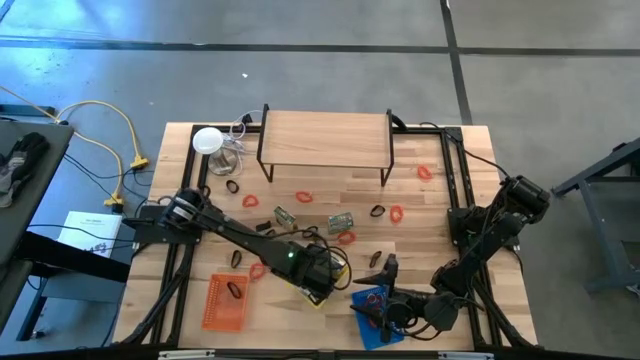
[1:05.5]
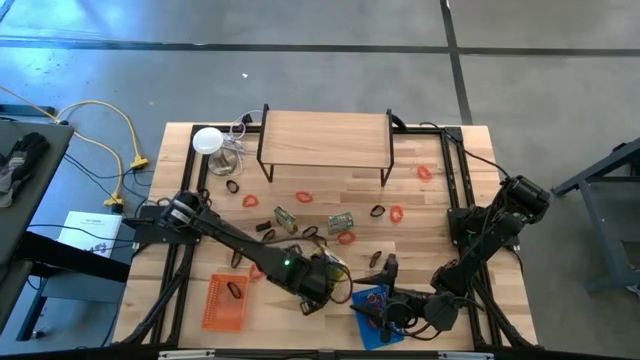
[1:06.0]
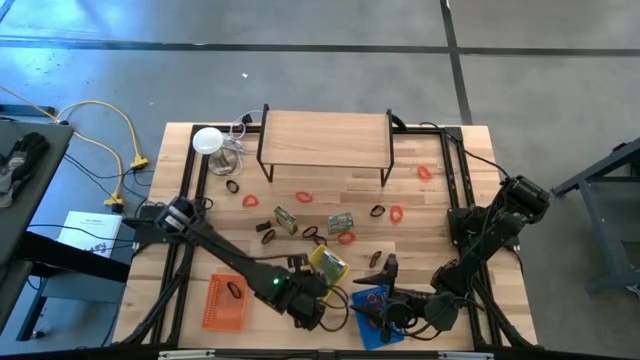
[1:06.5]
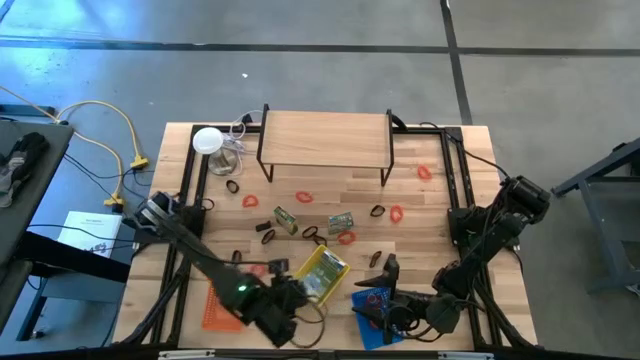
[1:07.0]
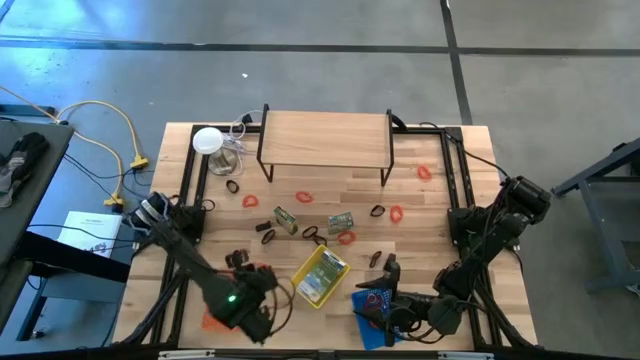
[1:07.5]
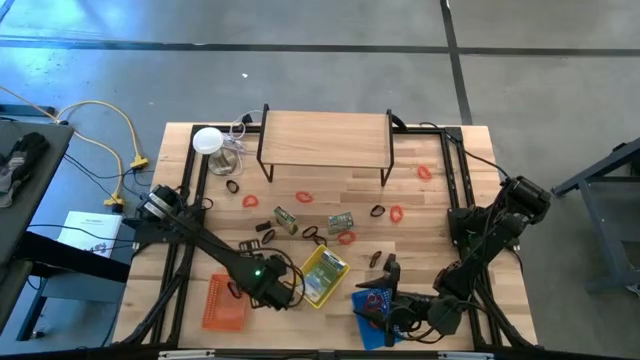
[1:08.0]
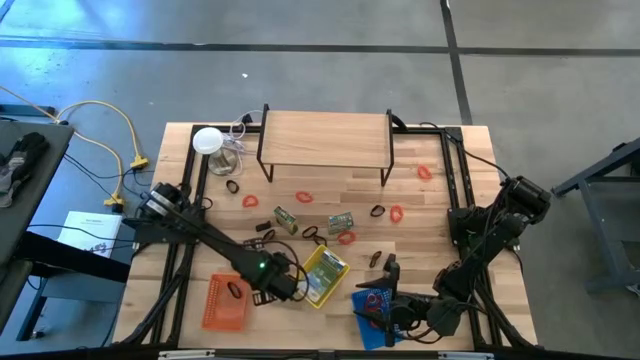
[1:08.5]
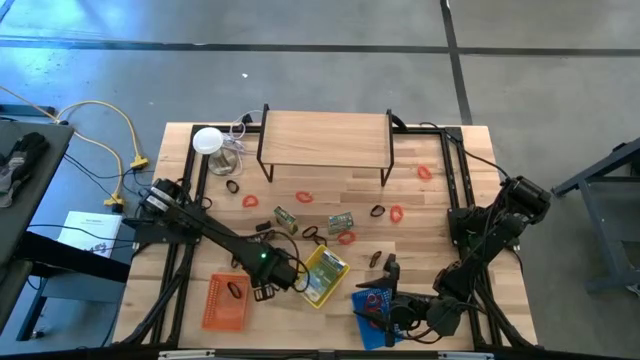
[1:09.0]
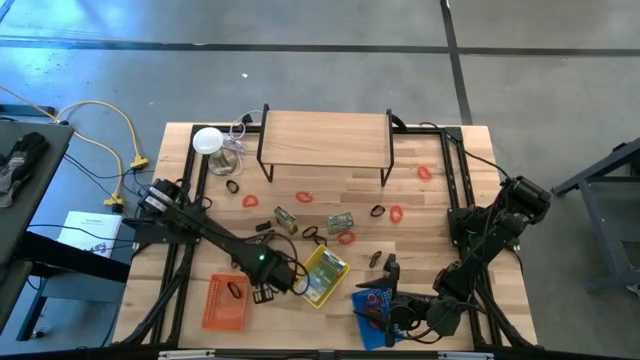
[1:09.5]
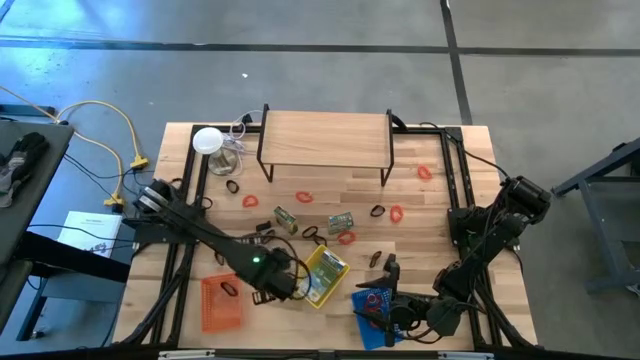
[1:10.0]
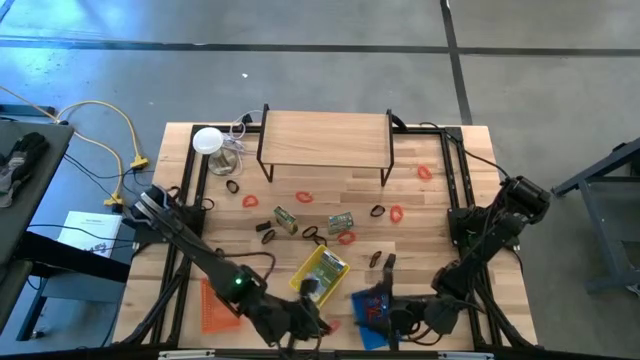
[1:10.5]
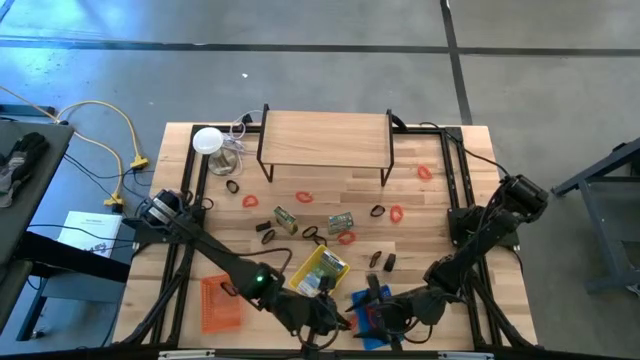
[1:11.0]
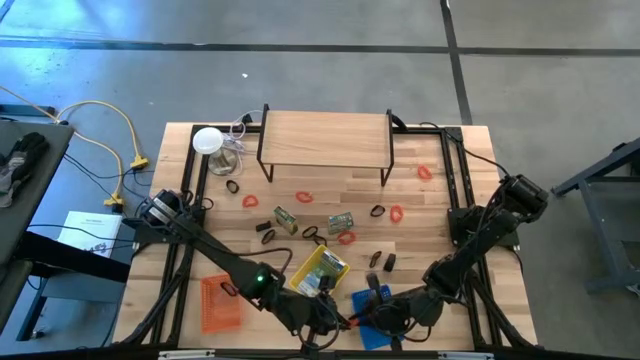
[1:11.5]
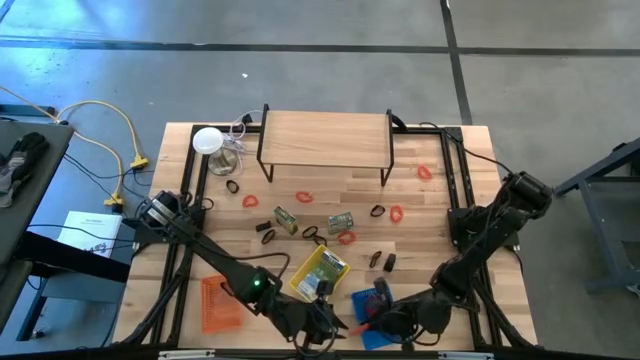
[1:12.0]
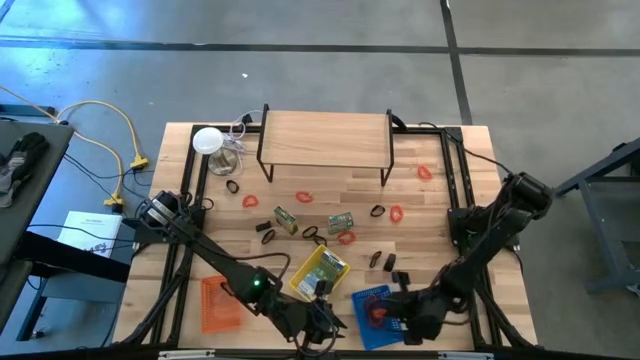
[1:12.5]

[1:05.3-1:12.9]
Task: Pick & Place Office Desk Supplies
Put the orange spring keychain into the blue bin

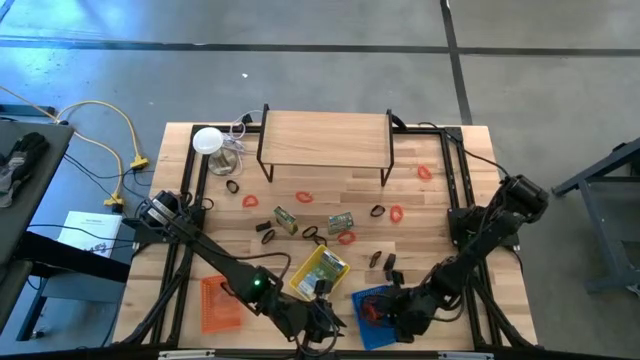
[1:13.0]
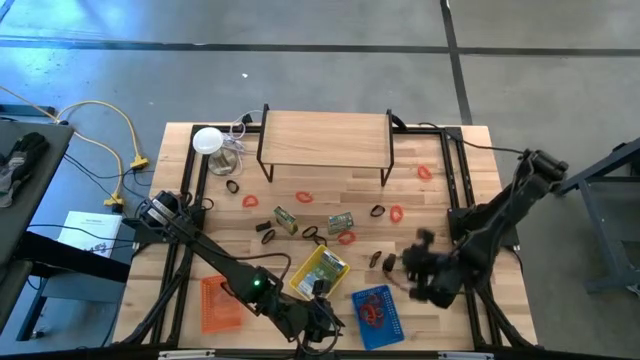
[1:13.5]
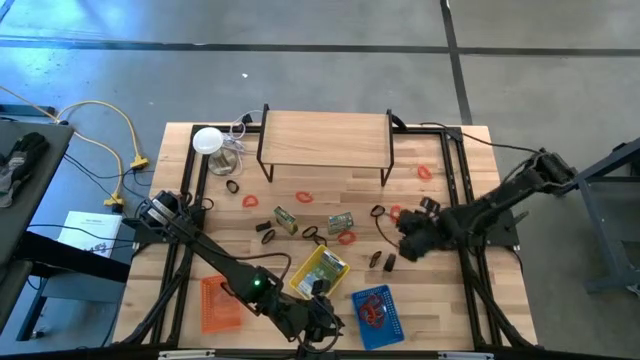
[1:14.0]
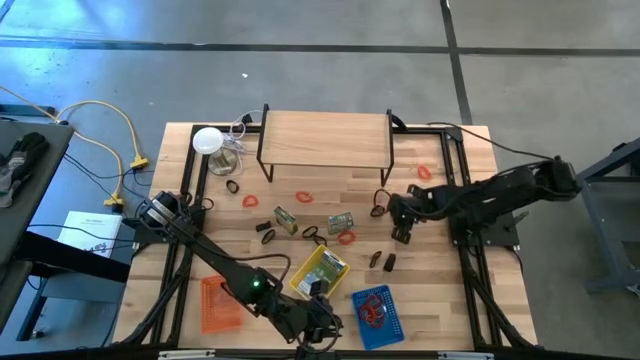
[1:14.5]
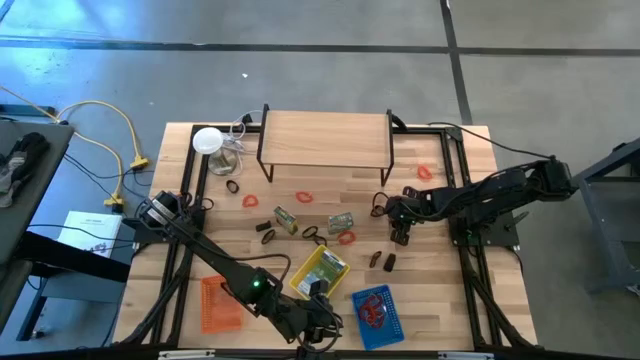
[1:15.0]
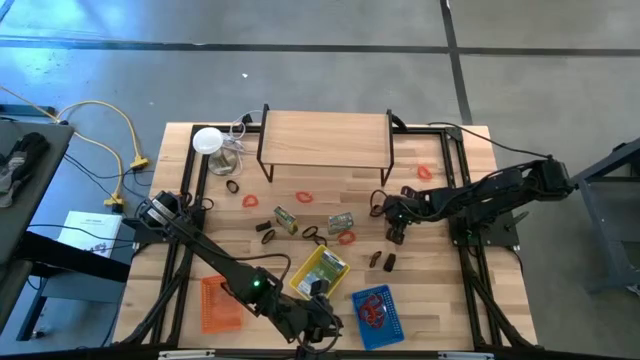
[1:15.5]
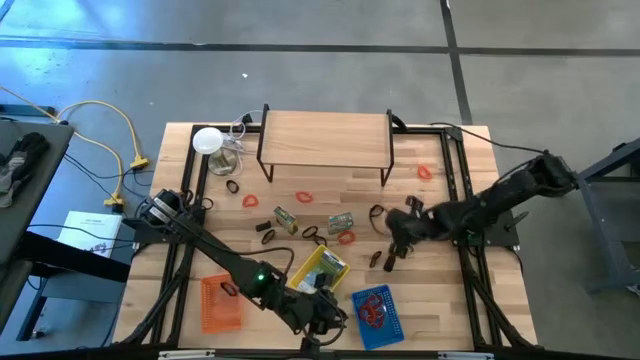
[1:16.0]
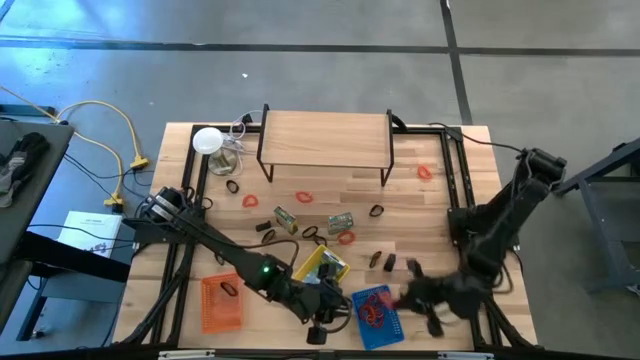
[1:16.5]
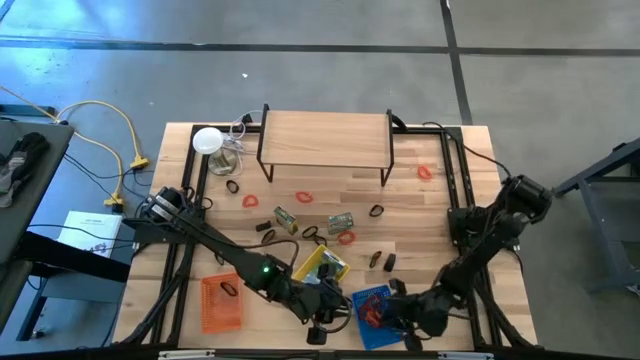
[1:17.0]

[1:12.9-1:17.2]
Put the orange spring keychain into the blue bin

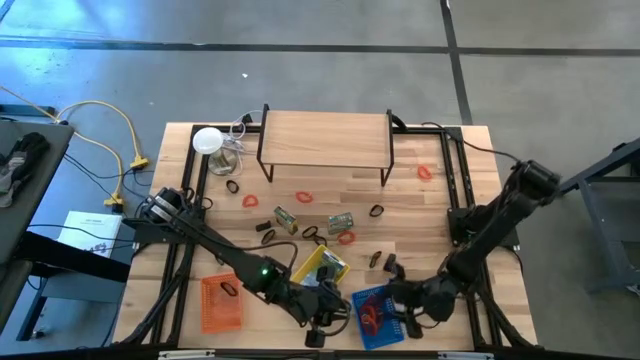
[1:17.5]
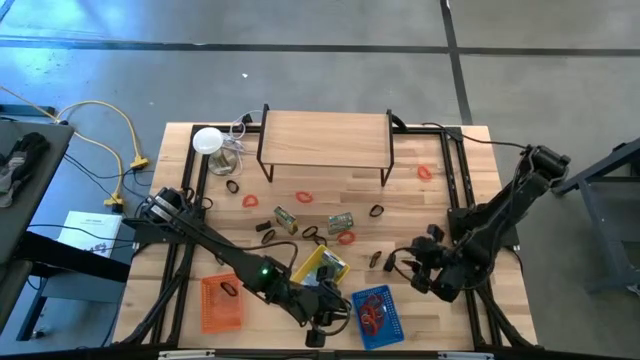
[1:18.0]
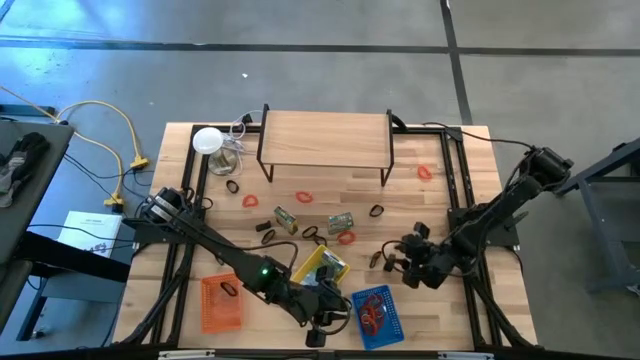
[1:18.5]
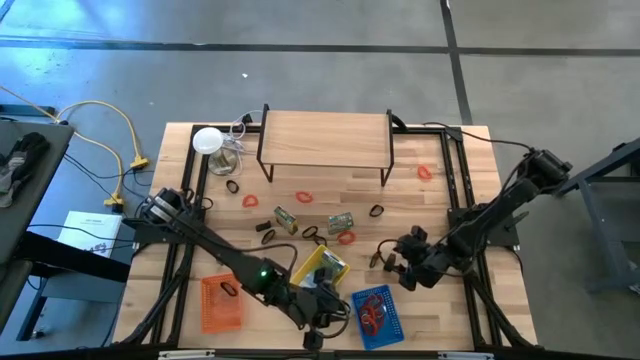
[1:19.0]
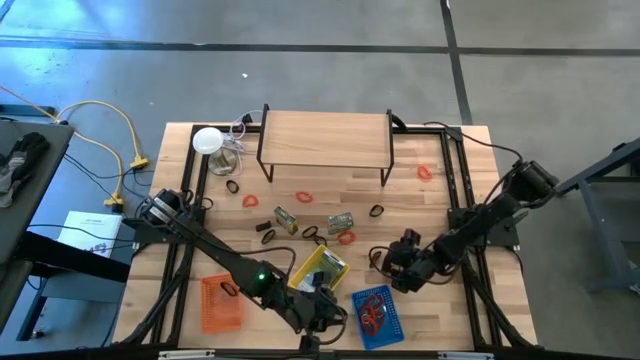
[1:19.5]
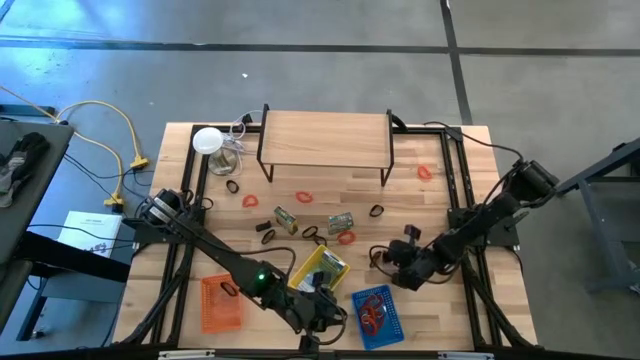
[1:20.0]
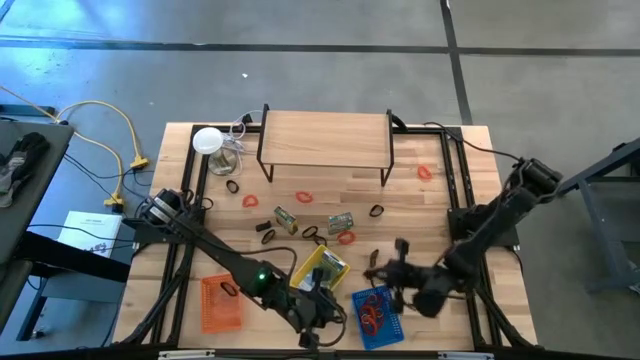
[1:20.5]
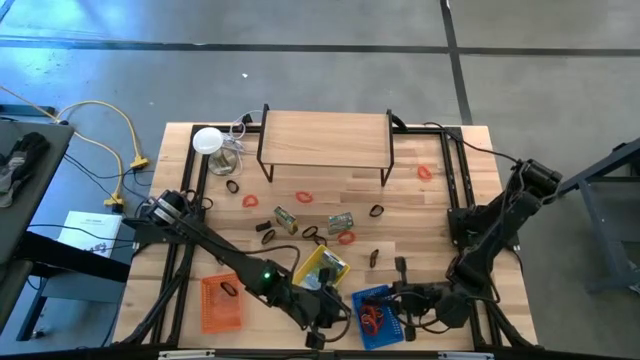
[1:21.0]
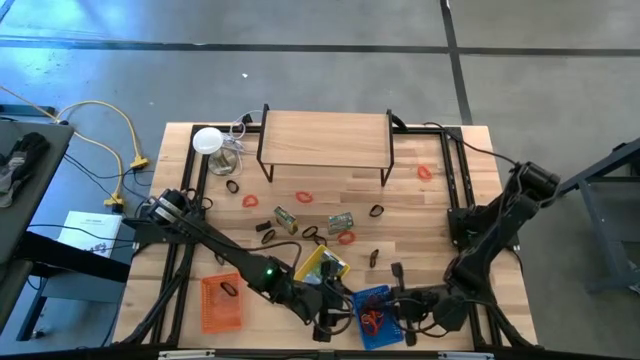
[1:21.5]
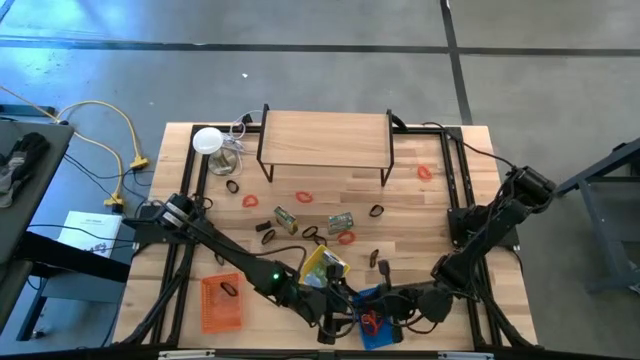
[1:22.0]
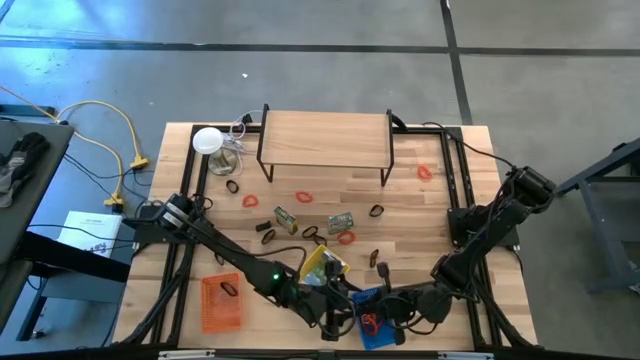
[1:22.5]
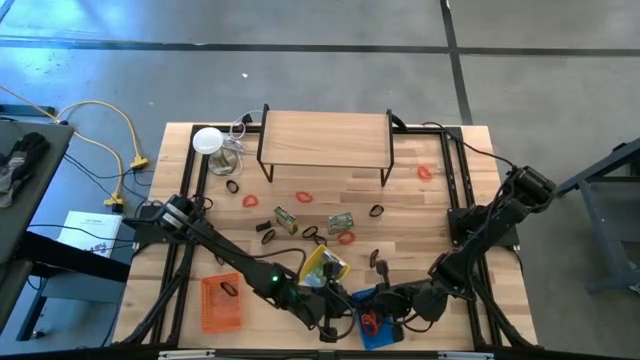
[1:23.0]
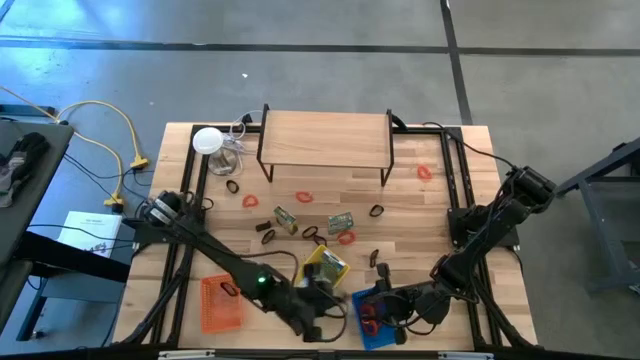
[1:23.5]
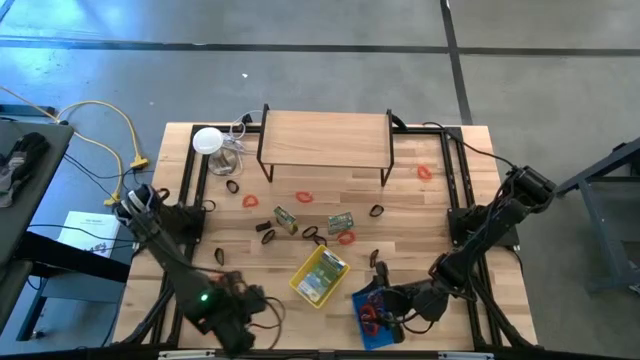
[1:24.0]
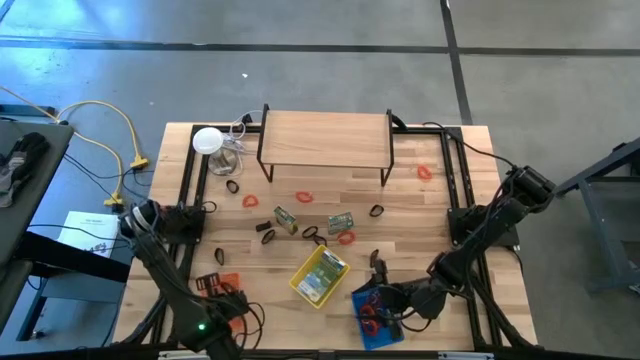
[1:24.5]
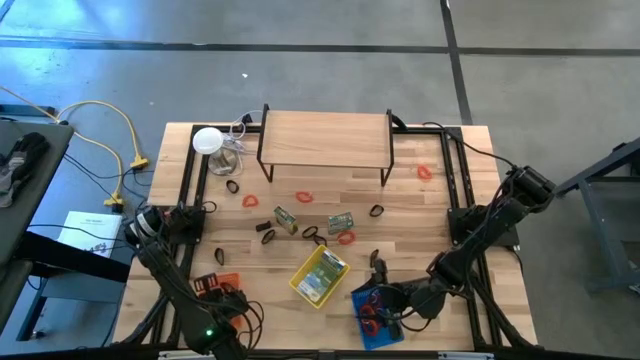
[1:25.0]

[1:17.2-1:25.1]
Put the black rubber band into the orange bin

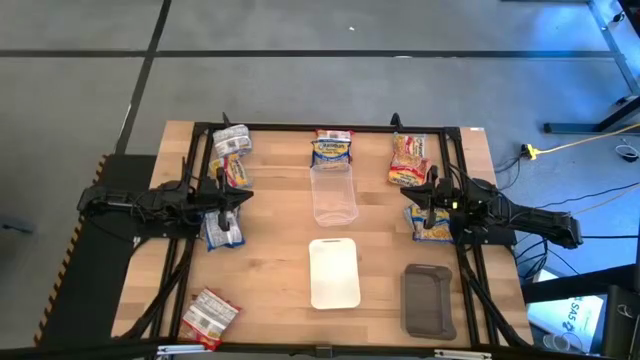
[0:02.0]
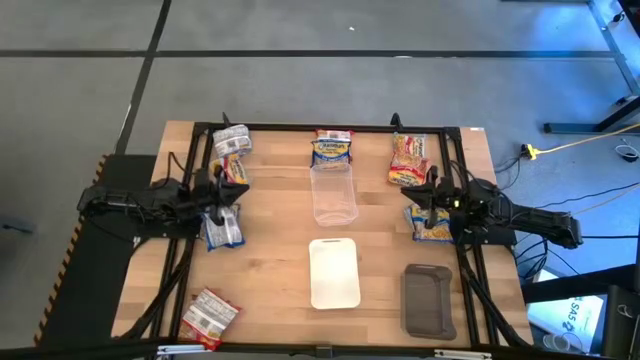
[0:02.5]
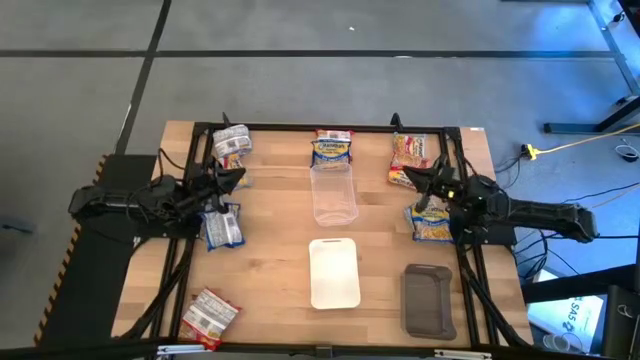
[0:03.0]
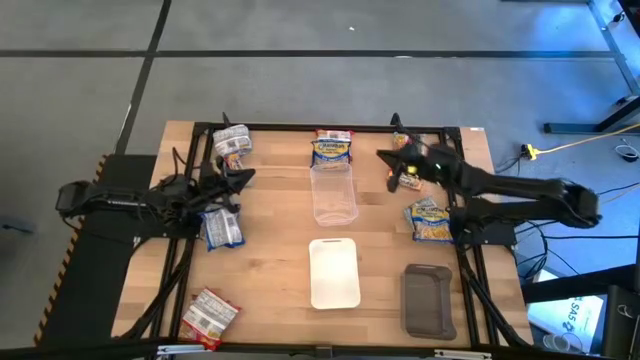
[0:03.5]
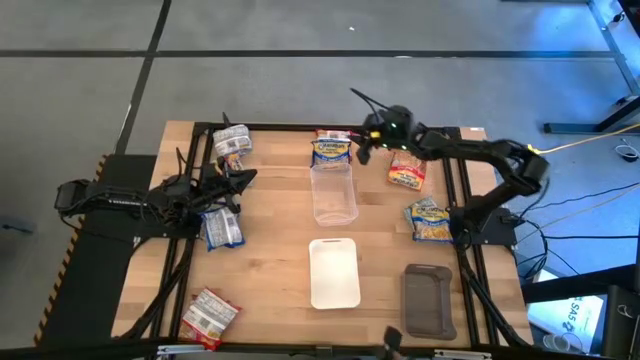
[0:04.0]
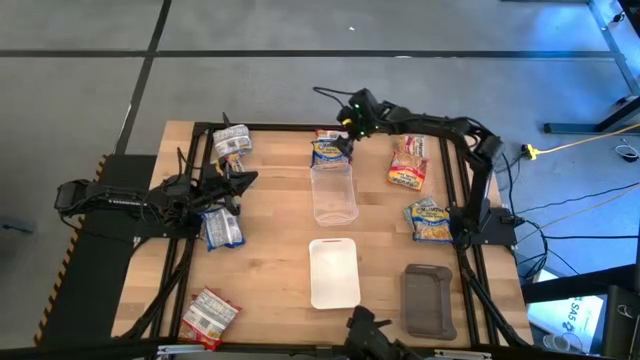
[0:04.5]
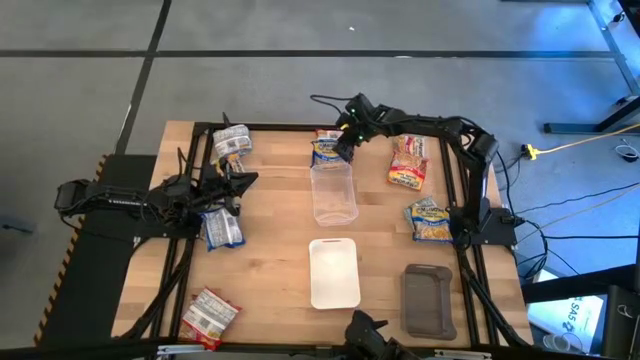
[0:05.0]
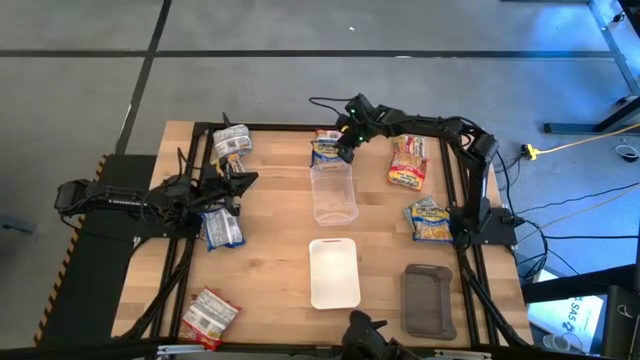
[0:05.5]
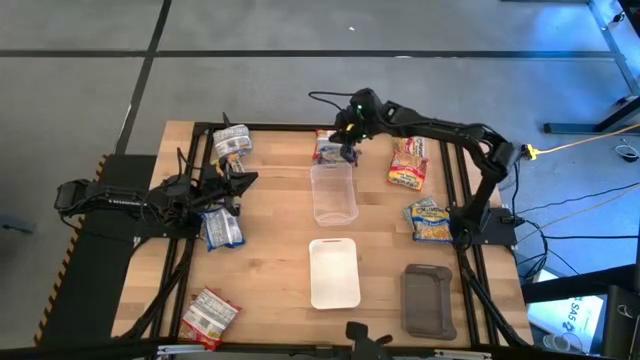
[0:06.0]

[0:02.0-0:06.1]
Task: Sort Maruchan noodles
Put the blue noodle pack into the transparent bin
